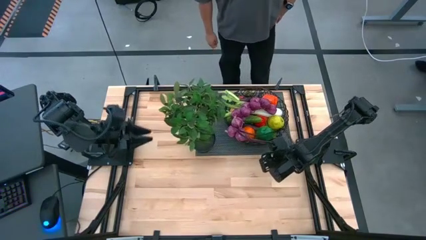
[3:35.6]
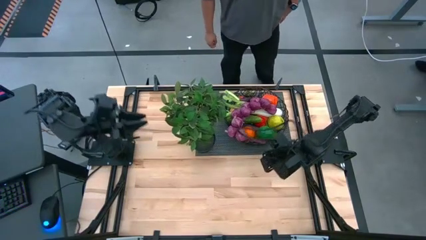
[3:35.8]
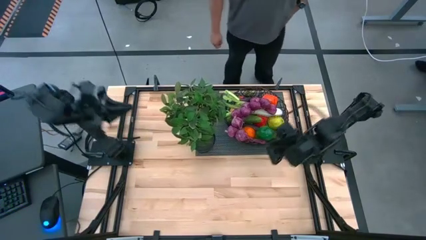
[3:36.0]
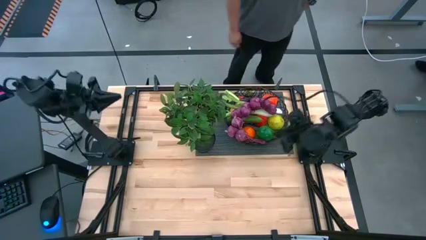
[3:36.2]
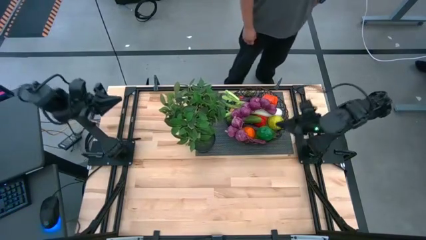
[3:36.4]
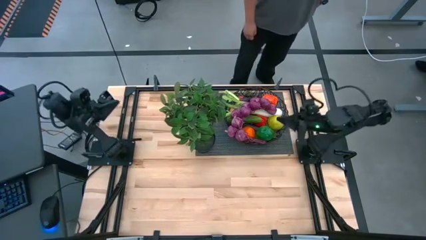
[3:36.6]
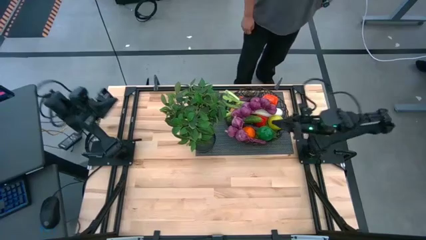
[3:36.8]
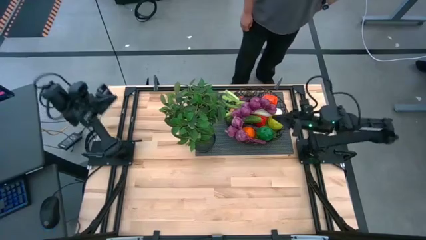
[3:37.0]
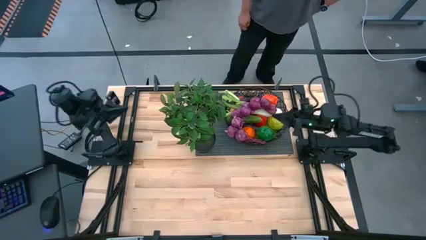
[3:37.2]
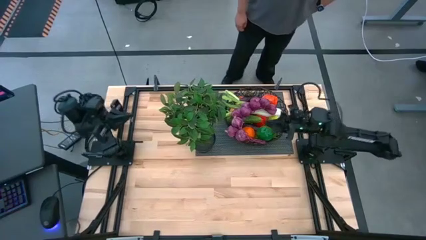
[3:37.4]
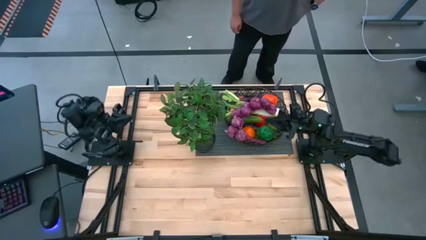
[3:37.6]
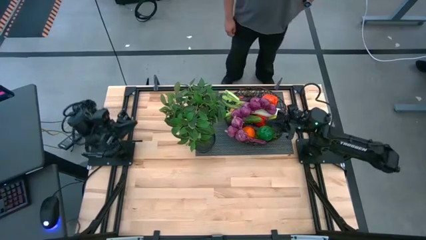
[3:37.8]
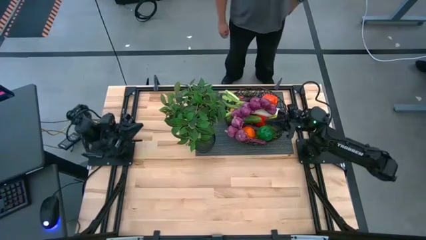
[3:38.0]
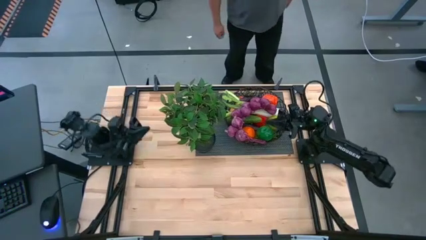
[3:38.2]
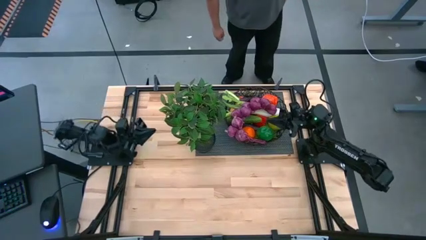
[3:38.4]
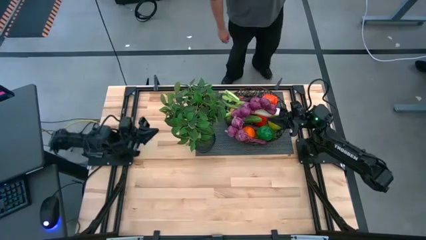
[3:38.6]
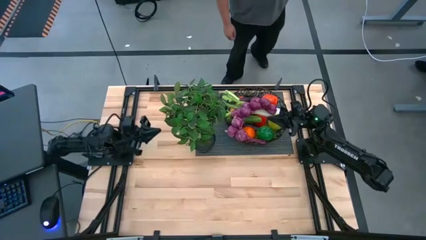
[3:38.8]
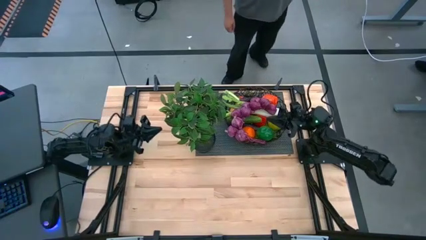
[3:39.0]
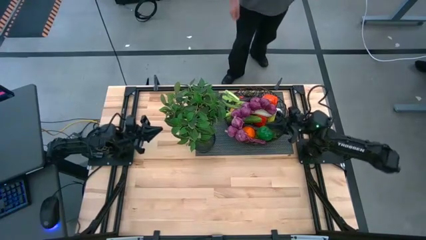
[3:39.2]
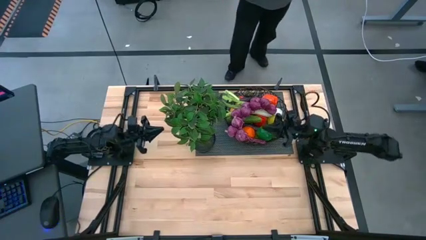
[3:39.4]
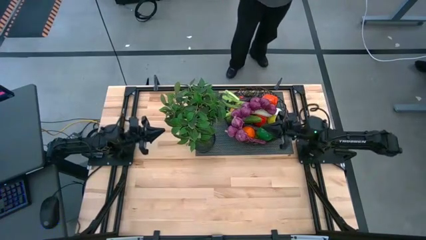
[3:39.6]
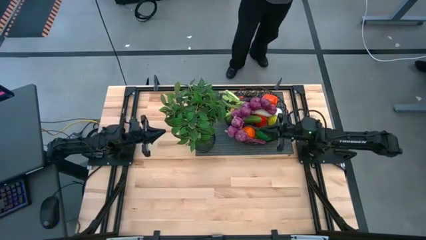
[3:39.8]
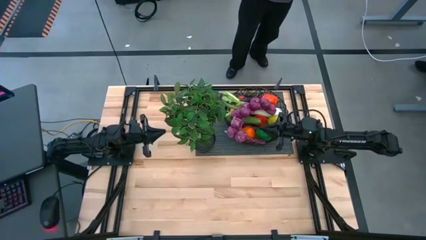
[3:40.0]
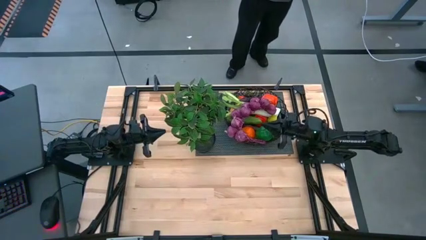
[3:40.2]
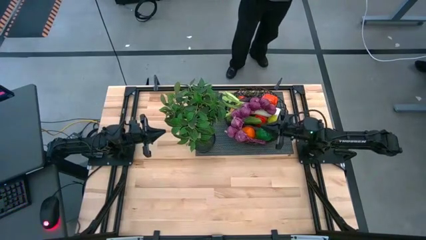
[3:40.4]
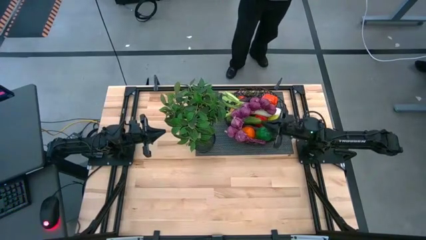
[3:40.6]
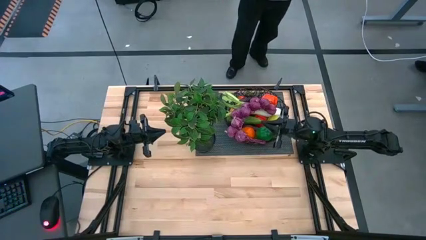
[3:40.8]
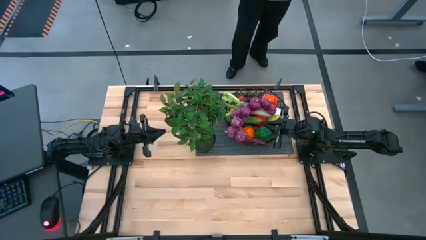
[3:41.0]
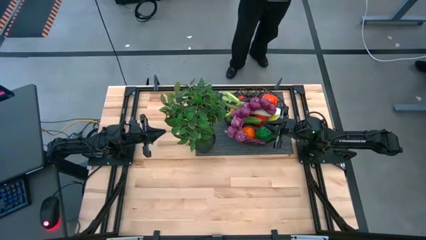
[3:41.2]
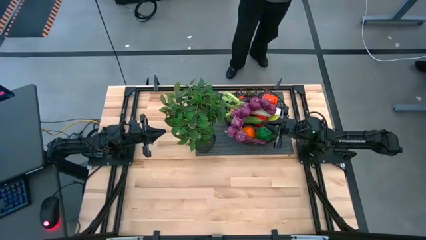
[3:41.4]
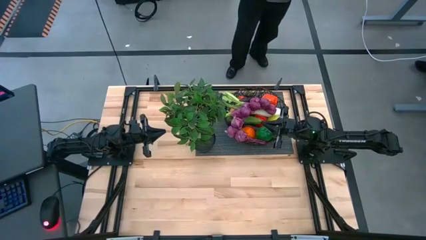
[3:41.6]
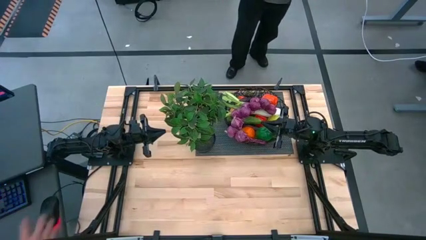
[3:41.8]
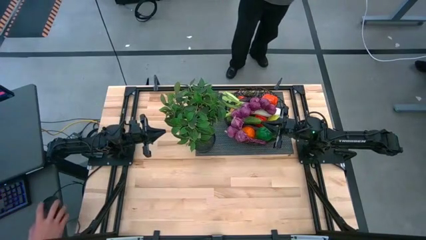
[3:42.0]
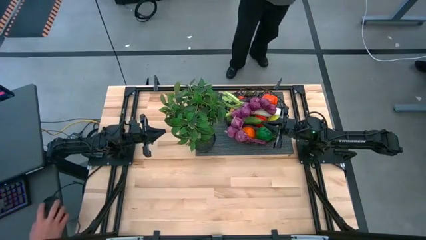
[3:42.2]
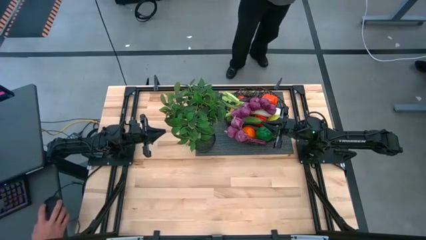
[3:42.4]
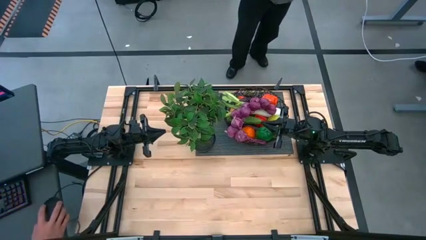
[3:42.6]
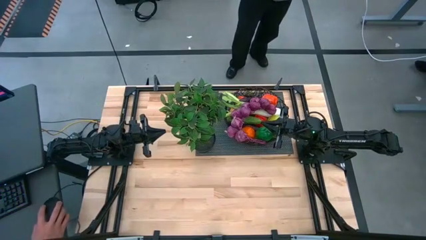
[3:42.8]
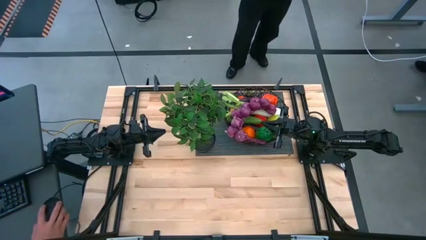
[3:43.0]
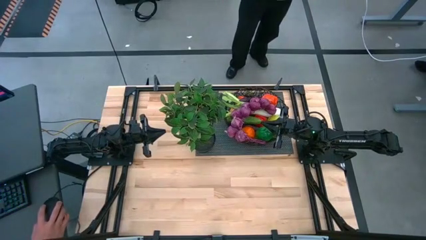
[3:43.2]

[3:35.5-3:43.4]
Task: Build produce basket
Return to Home Position

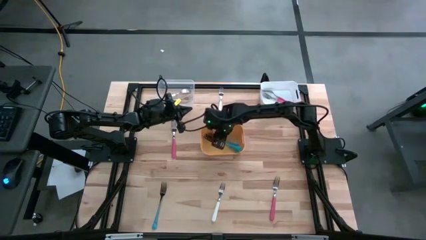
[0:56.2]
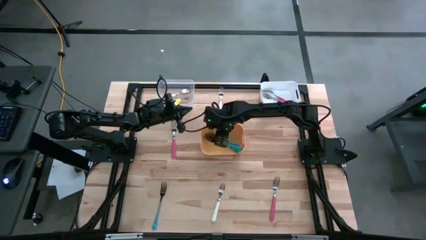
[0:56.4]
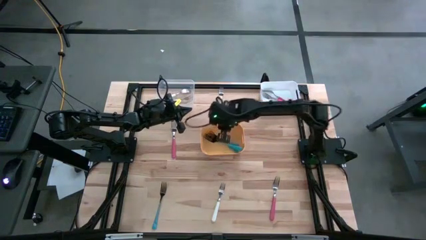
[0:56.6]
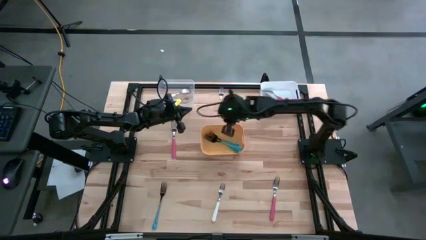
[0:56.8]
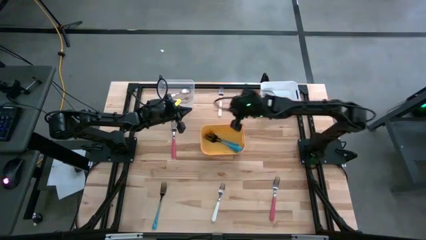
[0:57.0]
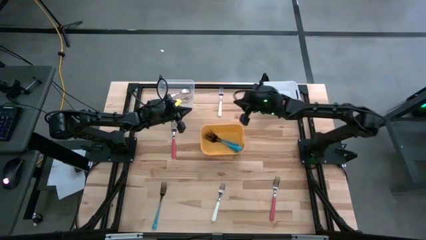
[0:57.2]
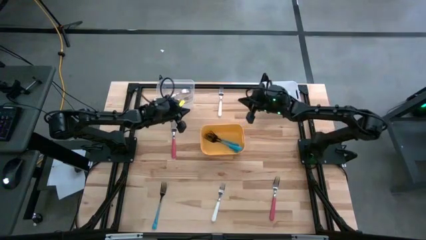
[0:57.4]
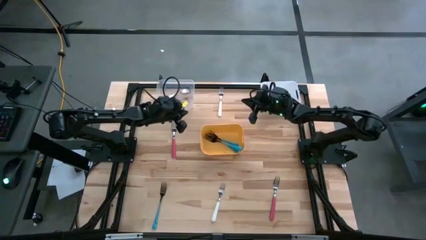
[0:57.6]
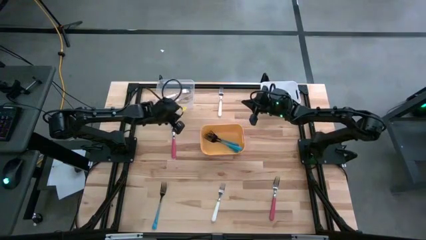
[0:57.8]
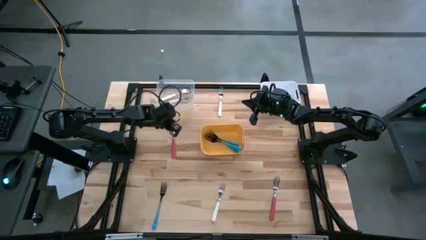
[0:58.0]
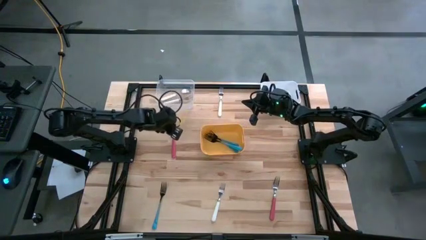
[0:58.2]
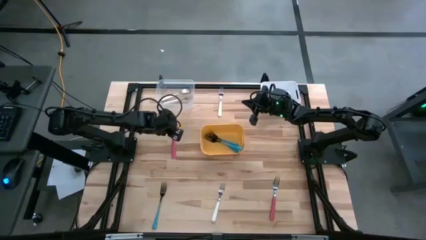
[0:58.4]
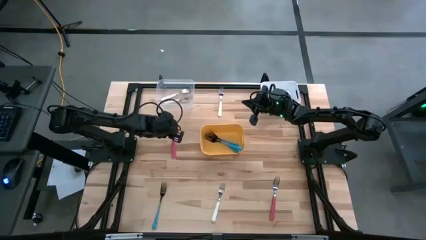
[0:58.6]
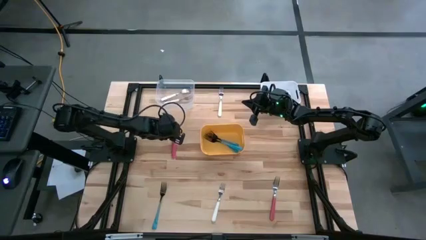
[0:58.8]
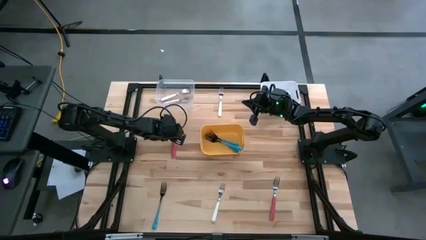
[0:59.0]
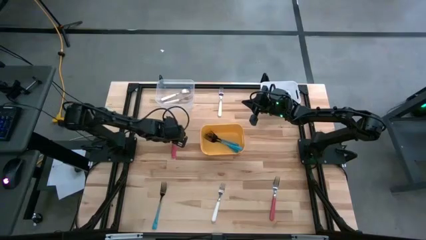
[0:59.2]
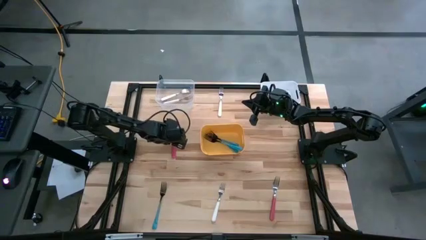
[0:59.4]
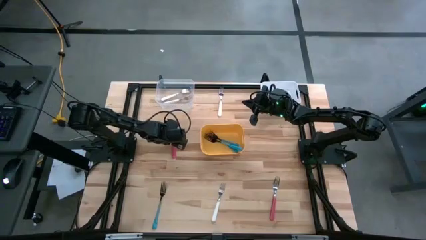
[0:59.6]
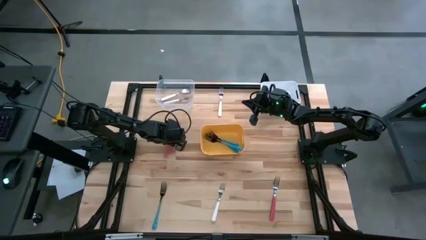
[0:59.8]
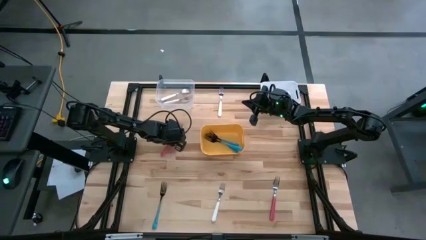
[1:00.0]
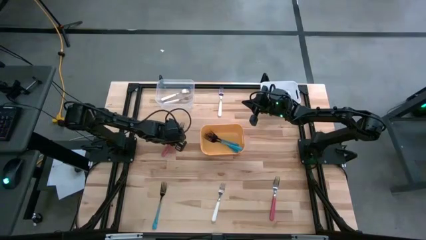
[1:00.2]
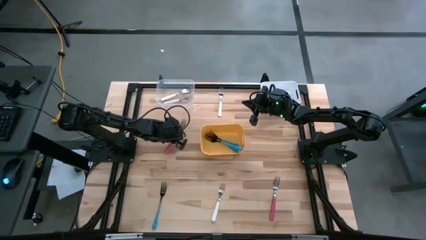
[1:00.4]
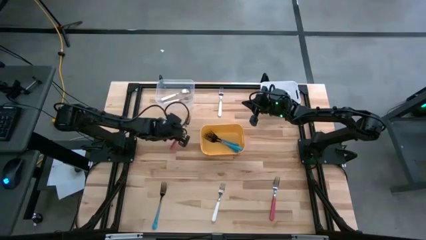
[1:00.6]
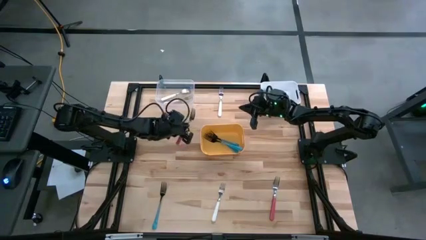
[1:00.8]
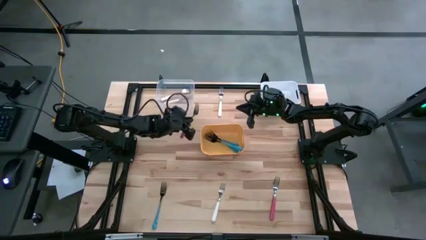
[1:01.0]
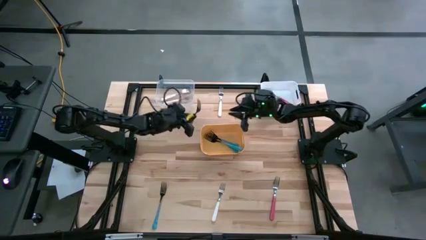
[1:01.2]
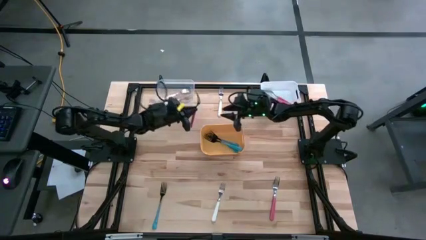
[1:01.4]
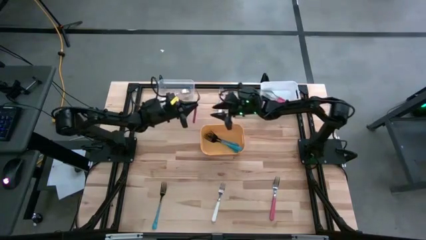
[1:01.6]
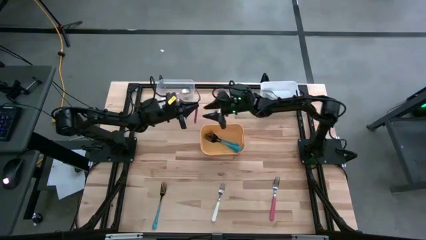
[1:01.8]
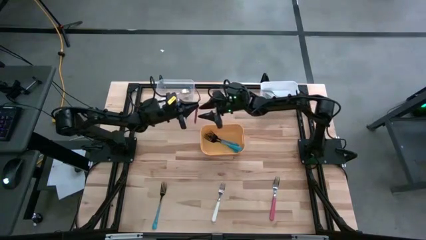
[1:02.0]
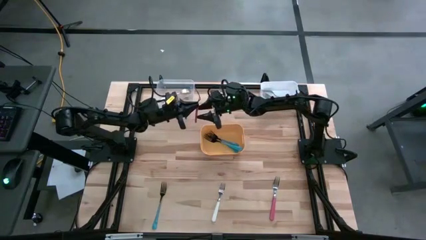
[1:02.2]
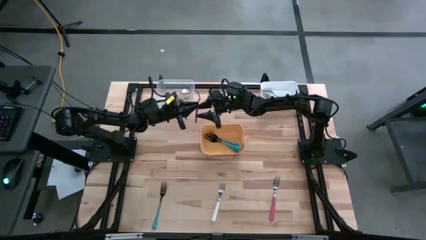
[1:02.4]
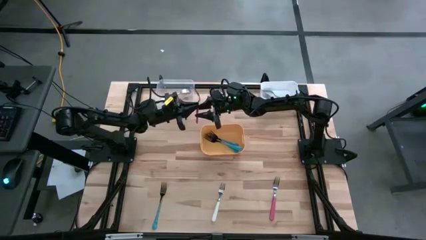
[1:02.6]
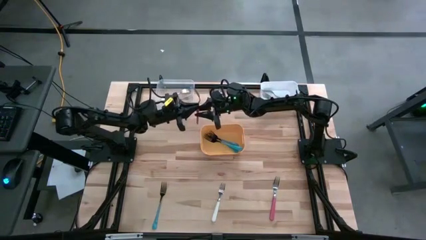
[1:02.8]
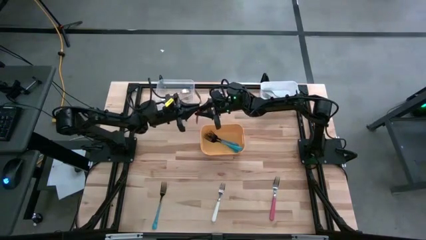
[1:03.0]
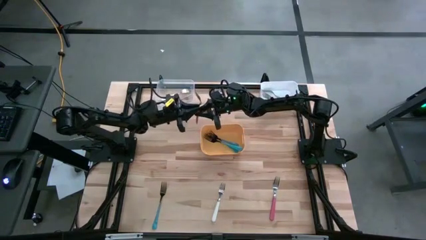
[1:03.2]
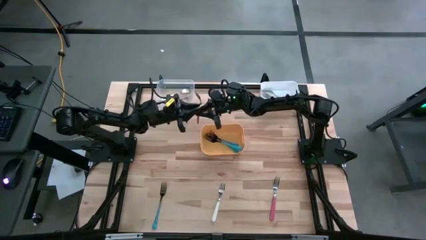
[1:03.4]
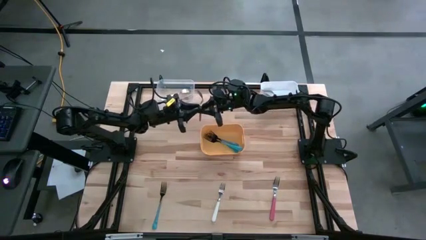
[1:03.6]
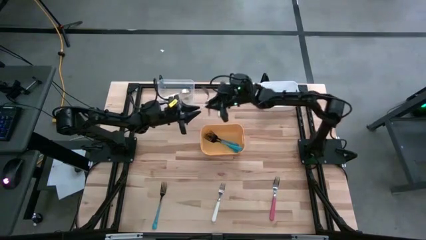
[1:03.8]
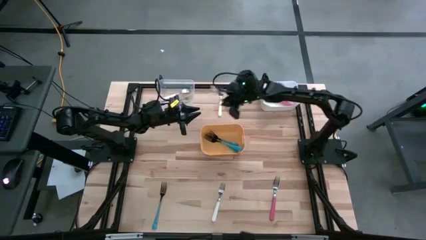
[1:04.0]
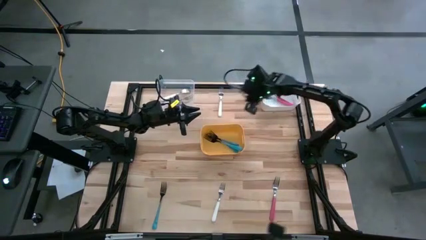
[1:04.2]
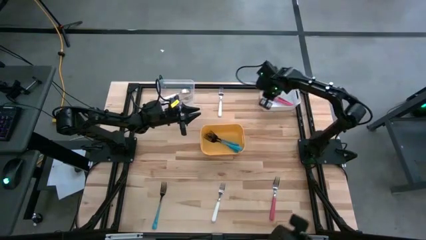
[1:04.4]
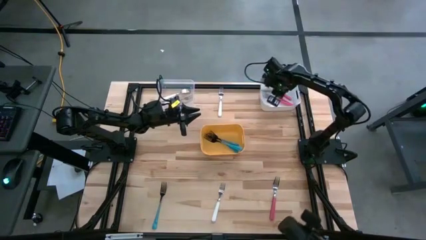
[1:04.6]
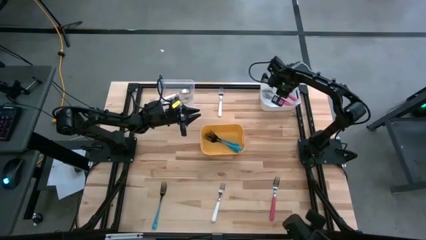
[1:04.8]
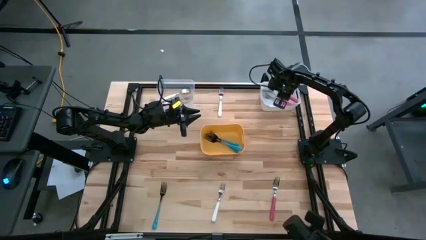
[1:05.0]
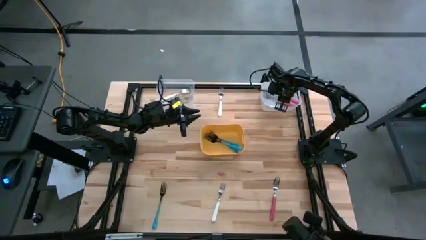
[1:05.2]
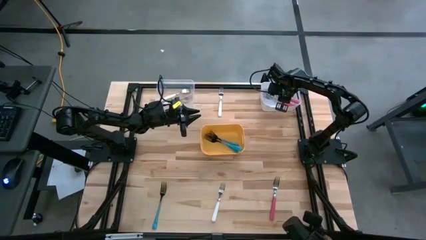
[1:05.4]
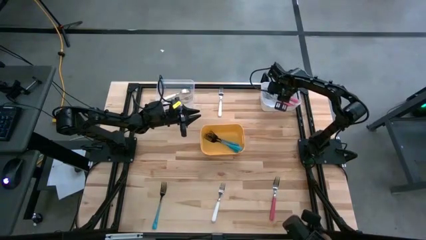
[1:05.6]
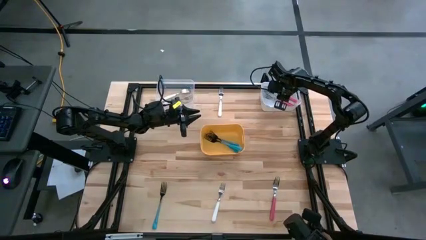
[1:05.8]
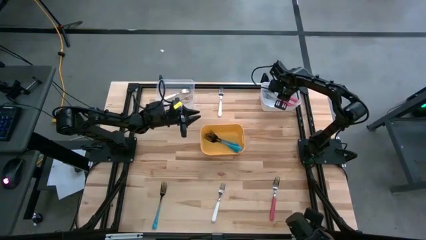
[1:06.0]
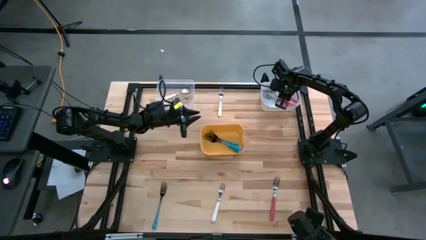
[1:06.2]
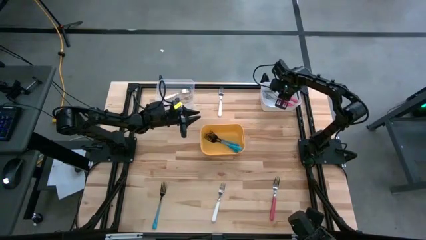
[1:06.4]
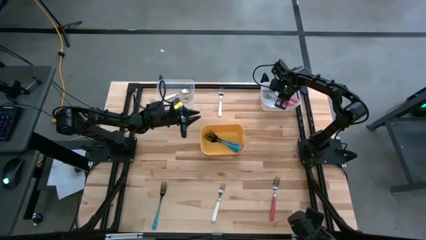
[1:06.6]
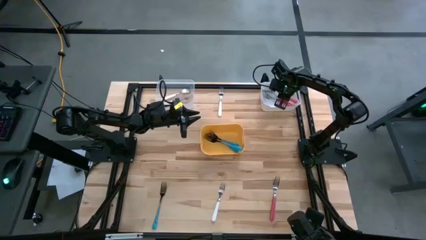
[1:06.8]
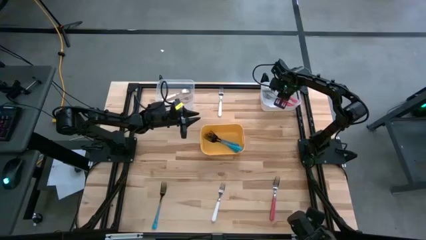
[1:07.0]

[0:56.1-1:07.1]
Task: Sort silverware by color (type)
Put the pink fork into the white bin
